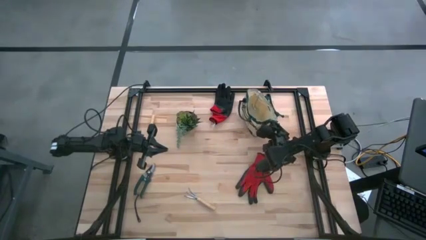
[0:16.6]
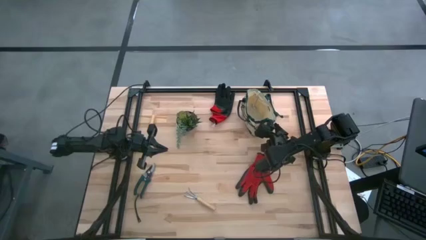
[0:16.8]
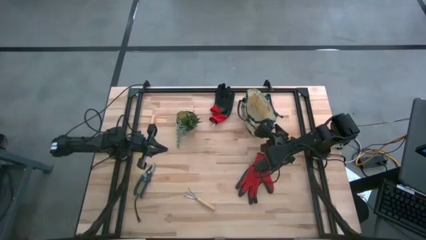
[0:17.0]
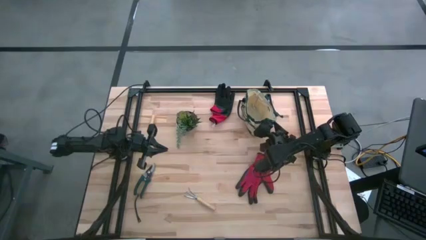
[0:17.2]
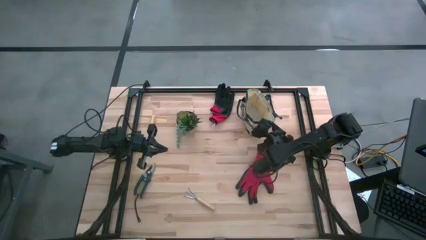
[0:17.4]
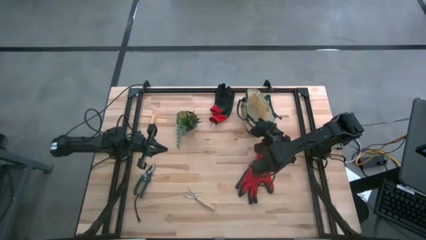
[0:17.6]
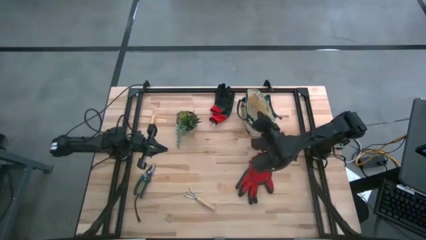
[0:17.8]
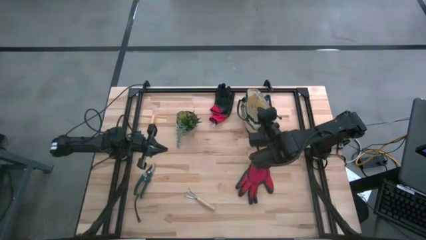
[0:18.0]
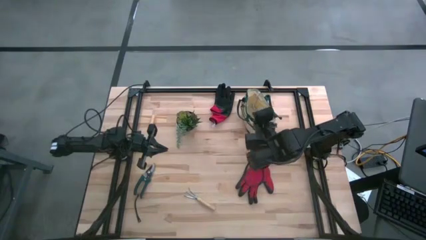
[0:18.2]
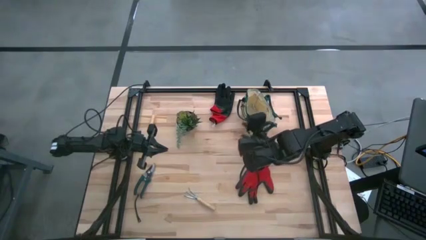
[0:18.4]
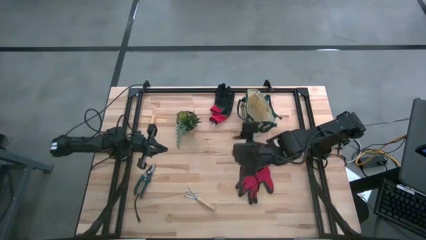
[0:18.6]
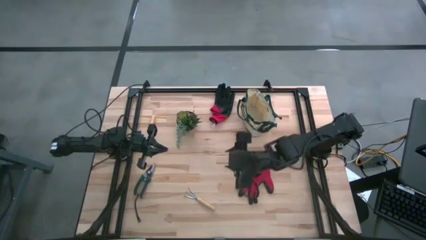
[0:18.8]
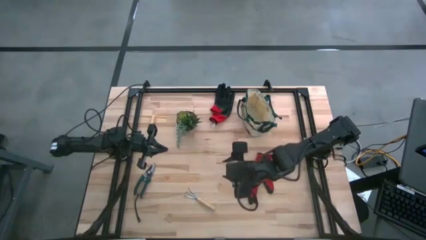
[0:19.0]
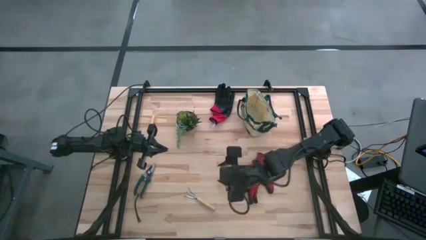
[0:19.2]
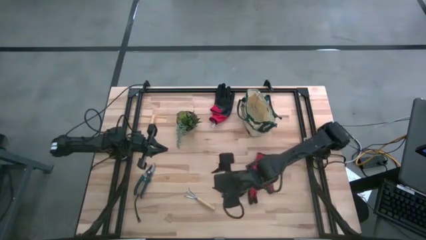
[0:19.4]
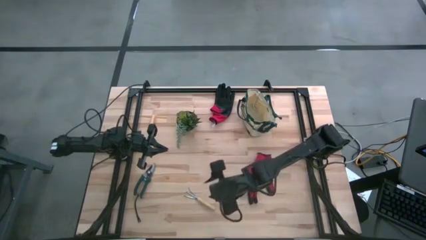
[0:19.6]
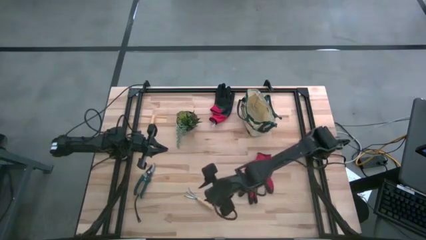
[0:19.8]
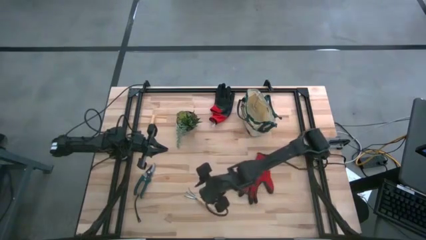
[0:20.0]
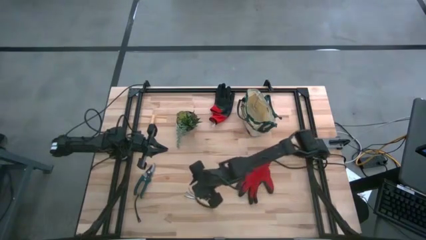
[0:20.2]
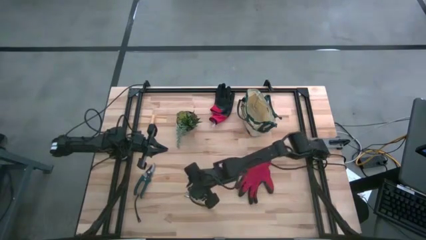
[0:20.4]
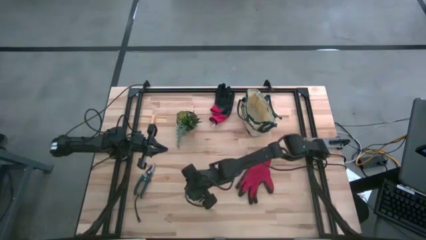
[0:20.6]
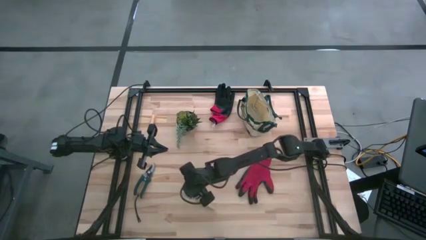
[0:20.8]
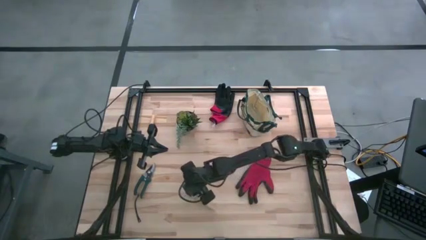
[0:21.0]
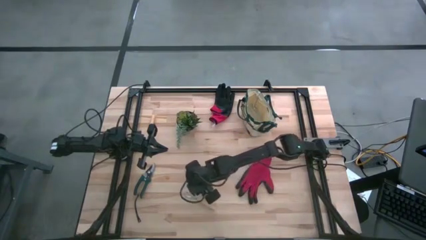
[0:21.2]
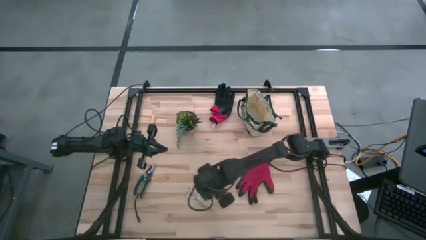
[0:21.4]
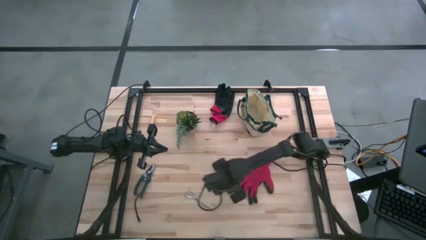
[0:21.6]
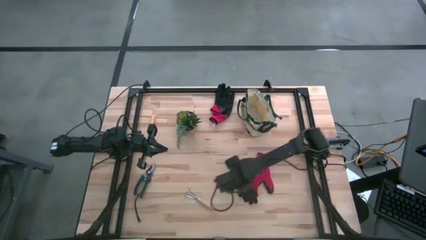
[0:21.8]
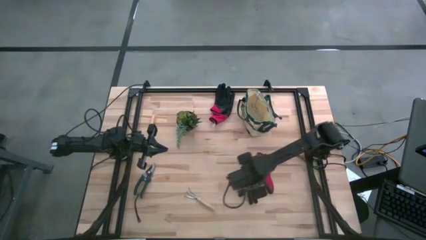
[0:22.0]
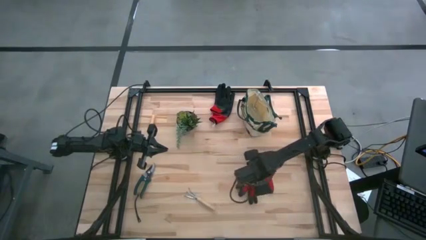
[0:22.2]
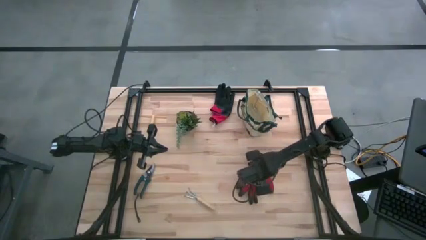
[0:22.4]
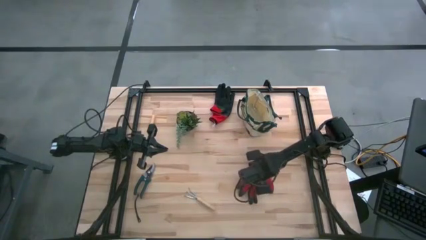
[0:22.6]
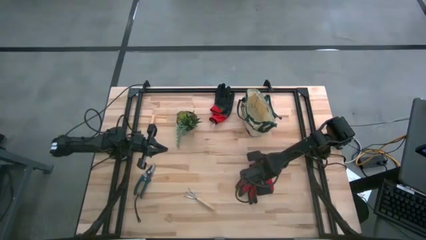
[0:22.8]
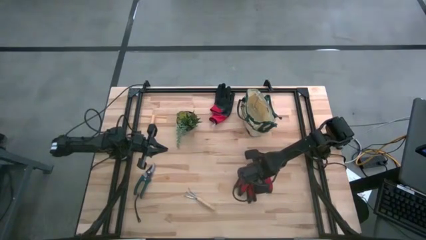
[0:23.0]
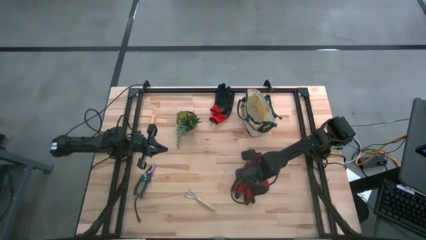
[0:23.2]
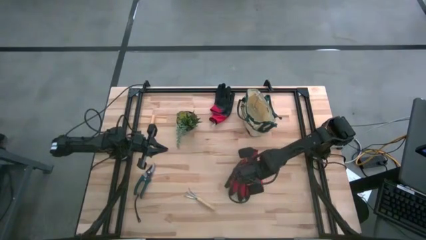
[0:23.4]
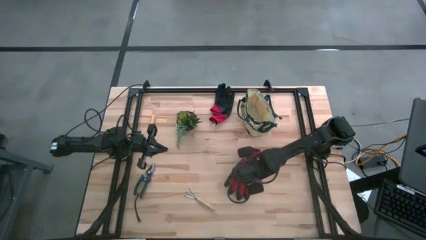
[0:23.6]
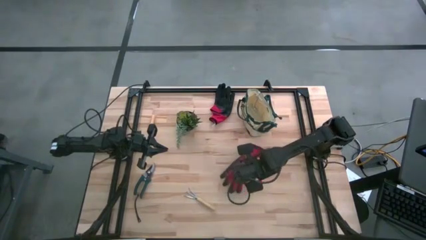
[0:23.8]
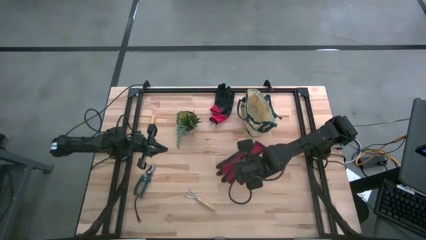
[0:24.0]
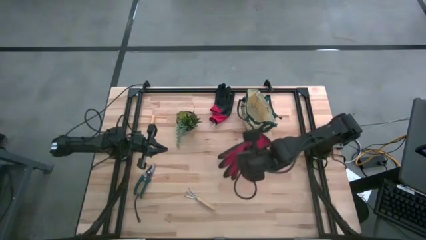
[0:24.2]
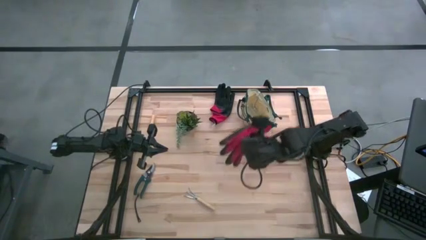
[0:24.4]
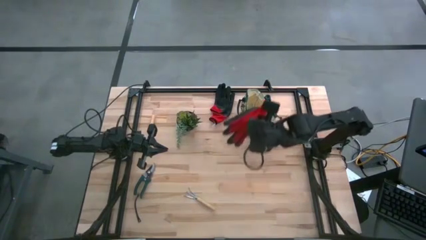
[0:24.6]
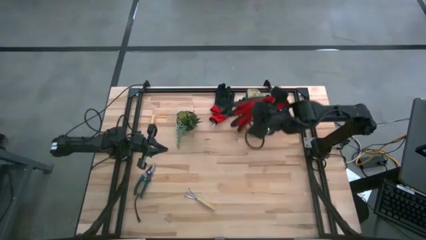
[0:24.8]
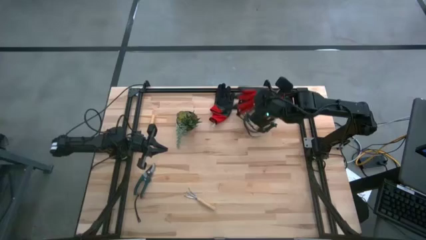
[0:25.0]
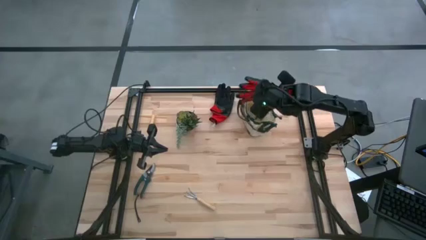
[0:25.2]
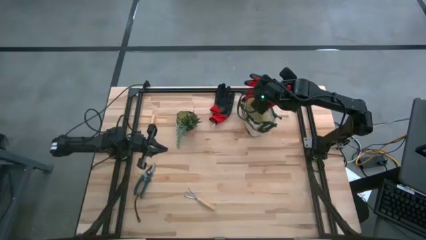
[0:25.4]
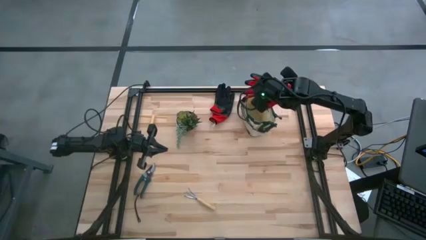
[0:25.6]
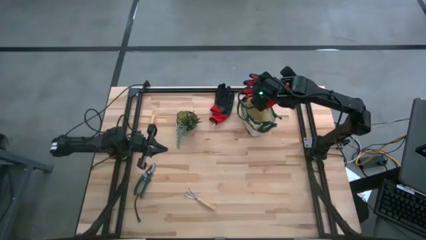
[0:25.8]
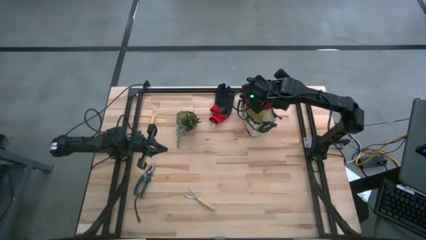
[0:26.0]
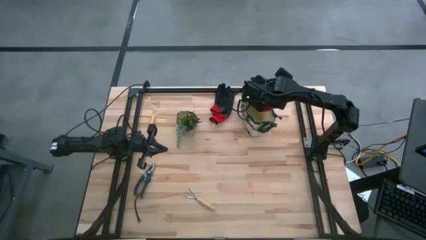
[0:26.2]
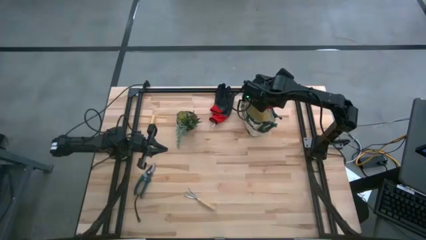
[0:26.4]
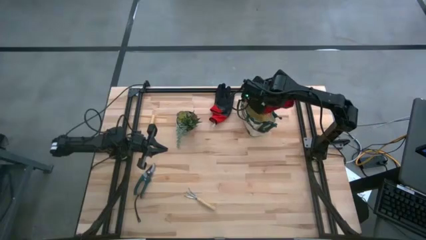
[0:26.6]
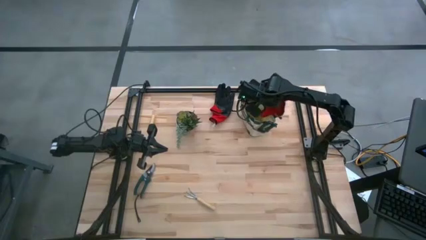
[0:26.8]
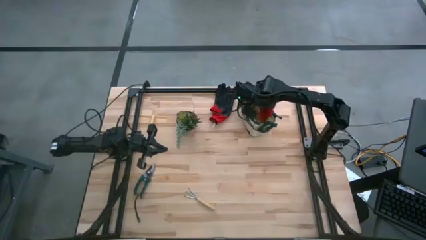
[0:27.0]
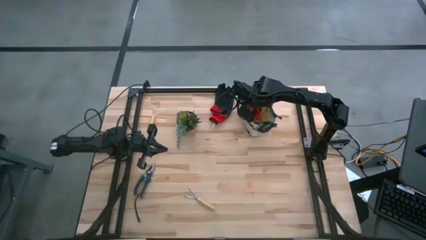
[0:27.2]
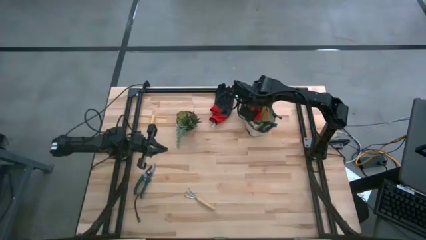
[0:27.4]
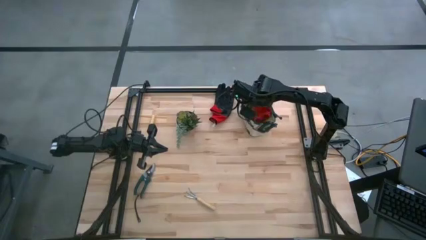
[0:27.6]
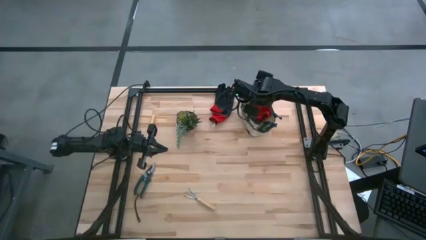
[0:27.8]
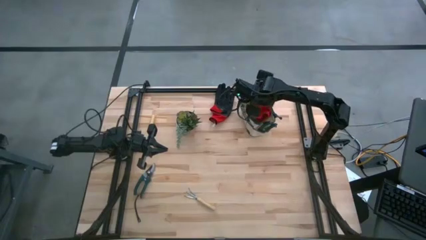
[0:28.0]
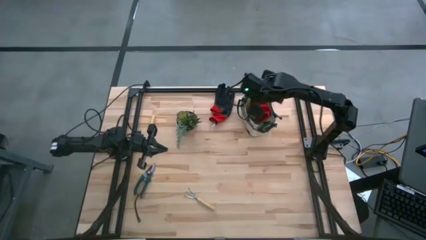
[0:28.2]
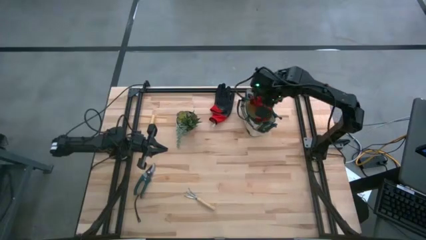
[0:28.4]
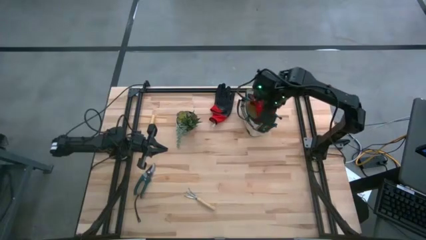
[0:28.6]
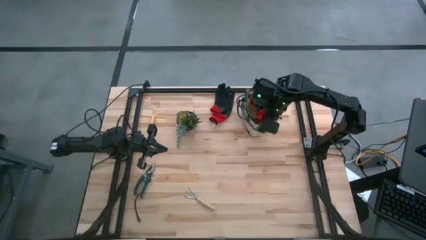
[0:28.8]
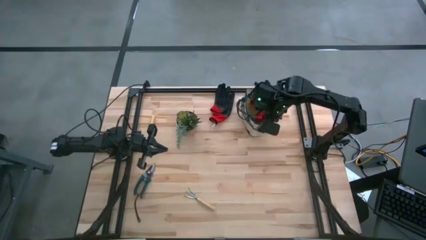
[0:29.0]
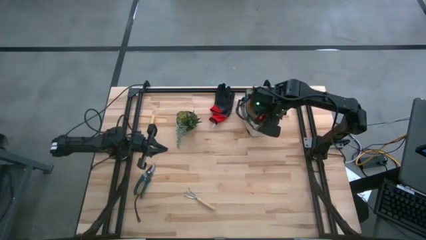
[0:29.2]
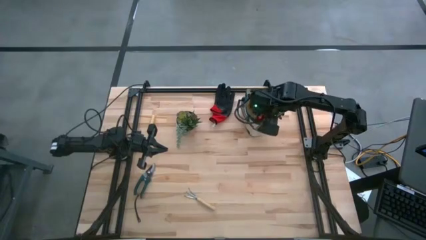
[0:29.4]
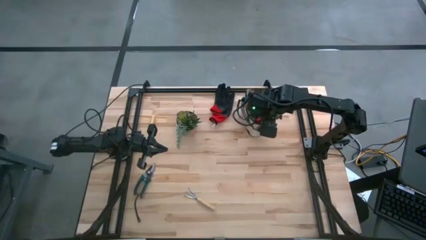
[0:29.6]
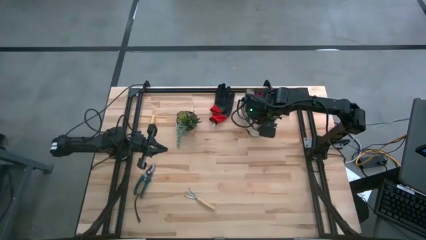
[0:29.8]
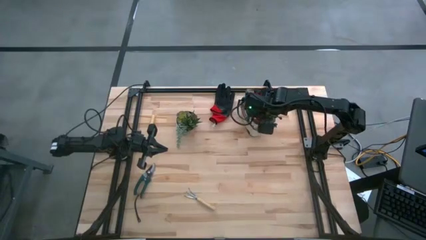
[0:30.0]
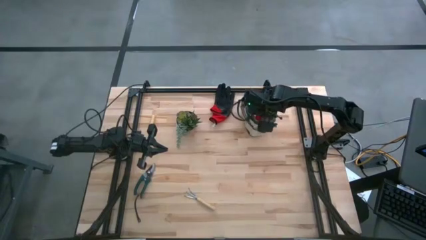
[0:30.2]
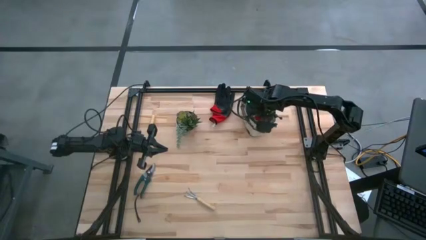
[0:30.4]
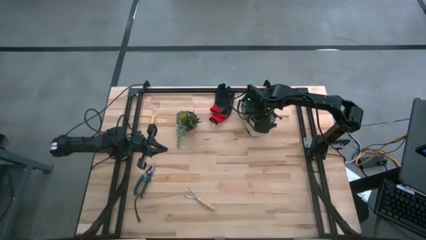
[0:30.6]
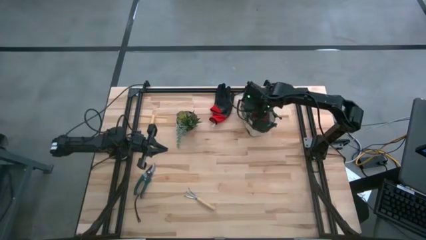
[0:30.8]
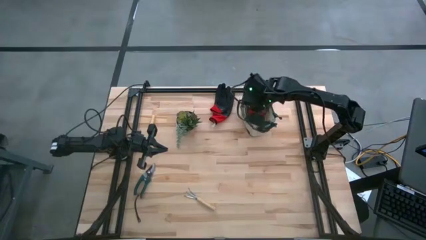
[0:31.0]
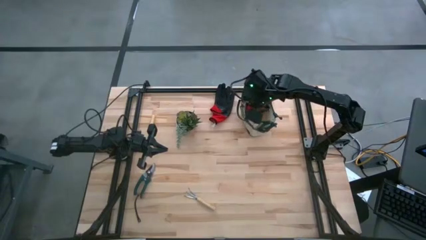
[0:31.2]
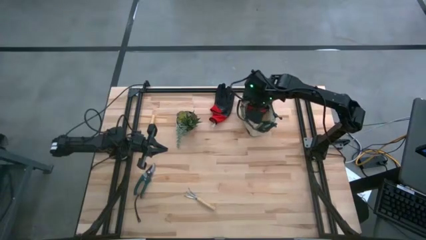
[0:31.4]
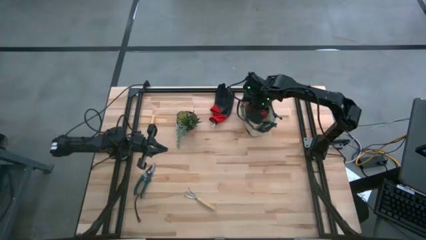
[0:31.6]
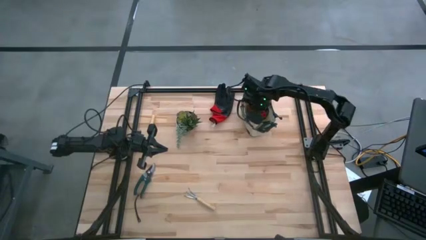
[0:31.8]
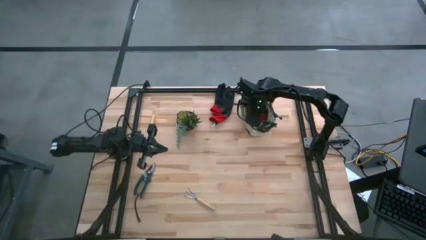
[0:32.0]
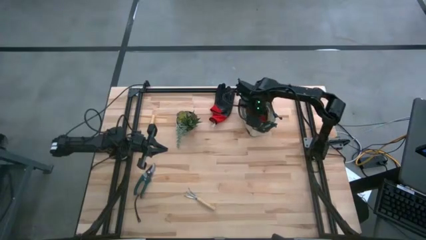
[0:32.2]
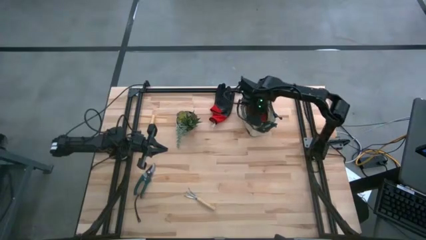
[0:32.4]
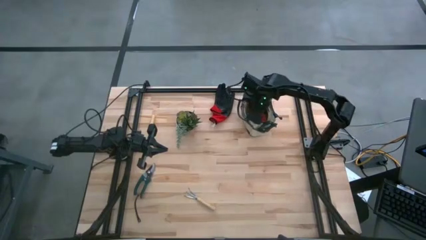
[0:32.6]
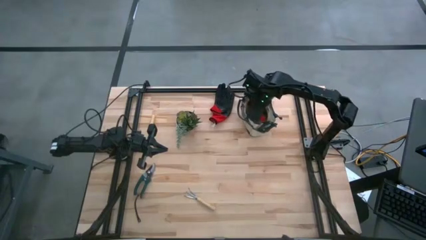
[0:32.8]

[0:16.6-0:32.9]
Task: Pick & Place Garden tools in Gardening bag
Put the bottom red gloves into the gardening bag
